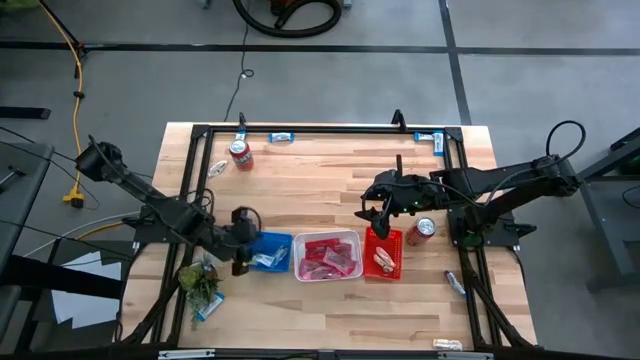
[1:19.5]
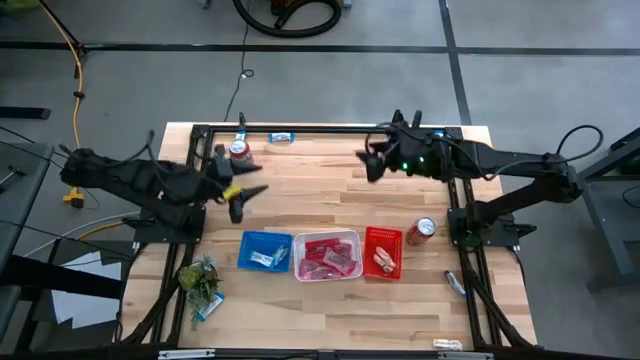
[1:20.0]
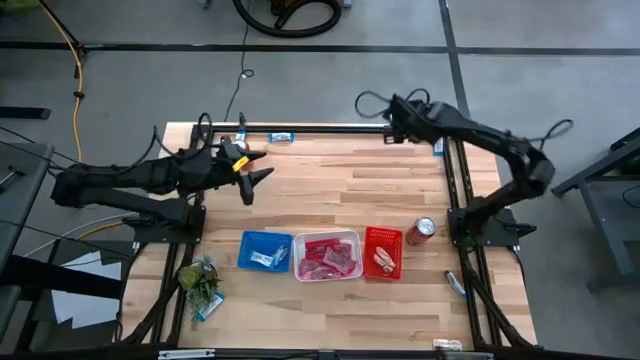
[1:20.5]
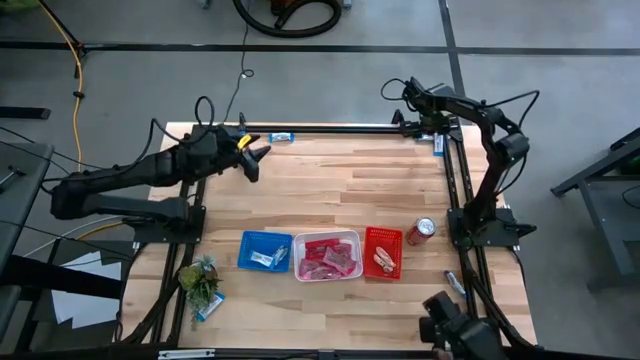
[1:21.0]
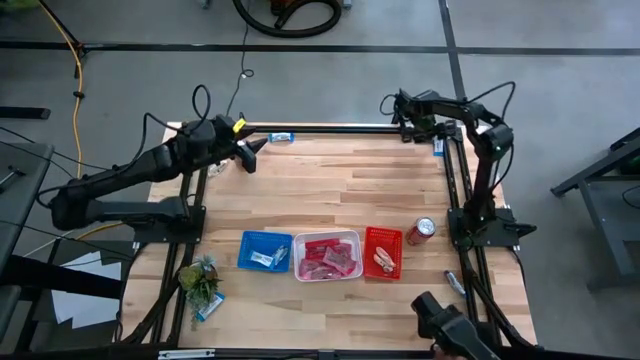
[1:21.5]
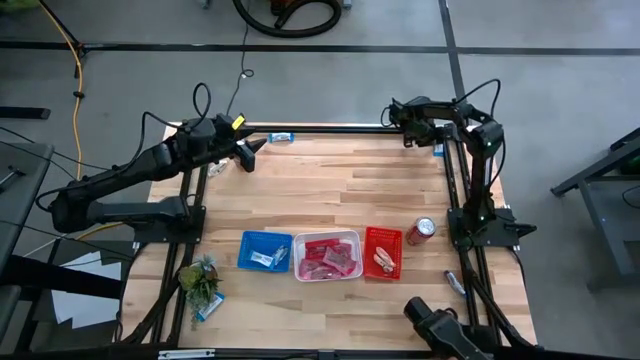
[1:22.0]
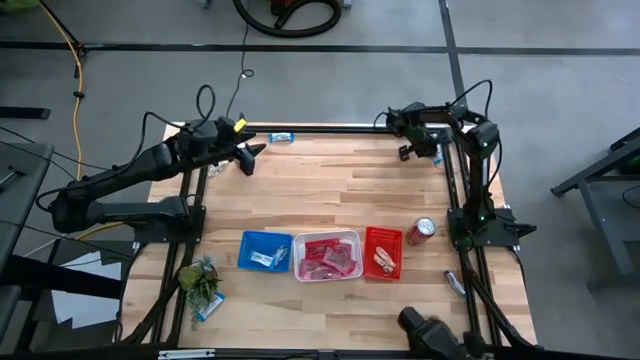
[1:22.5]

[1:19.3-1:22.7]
Task: Sort candy
Put the white chocolate into the blue bin

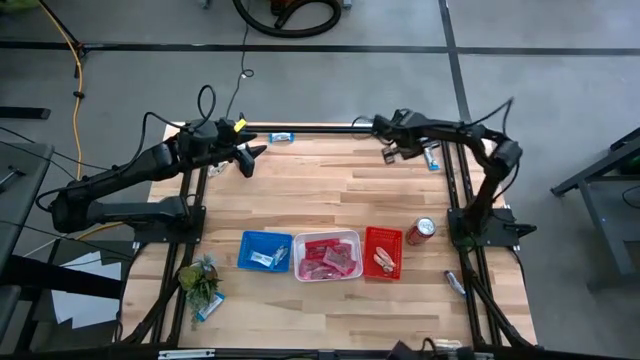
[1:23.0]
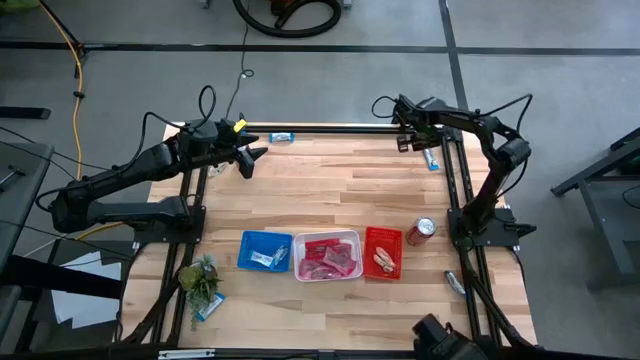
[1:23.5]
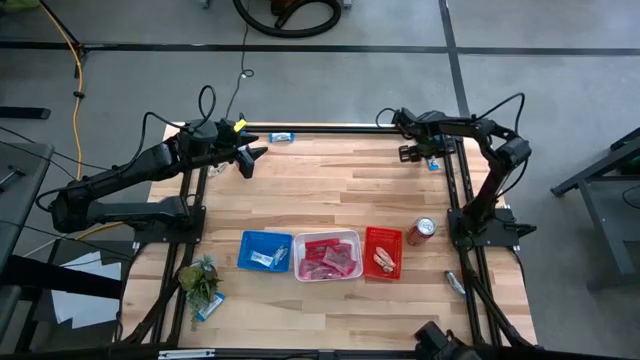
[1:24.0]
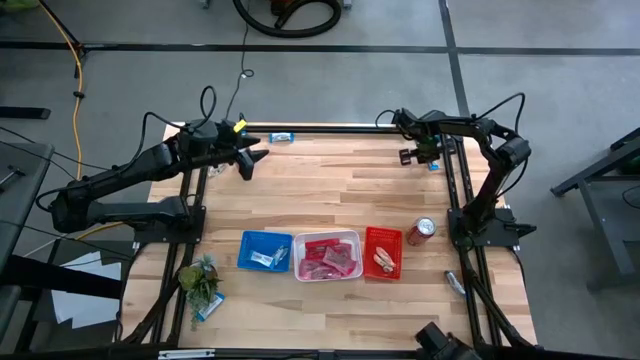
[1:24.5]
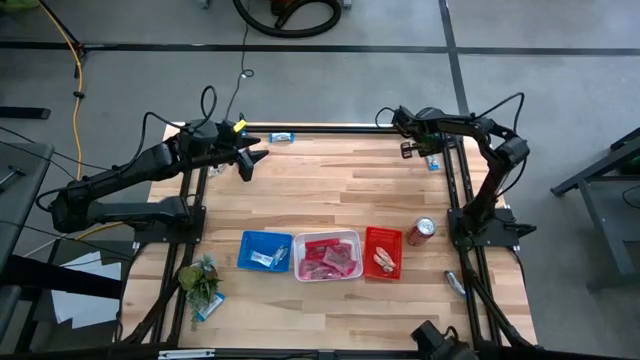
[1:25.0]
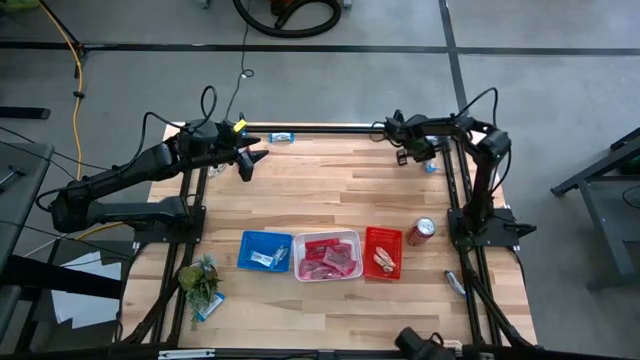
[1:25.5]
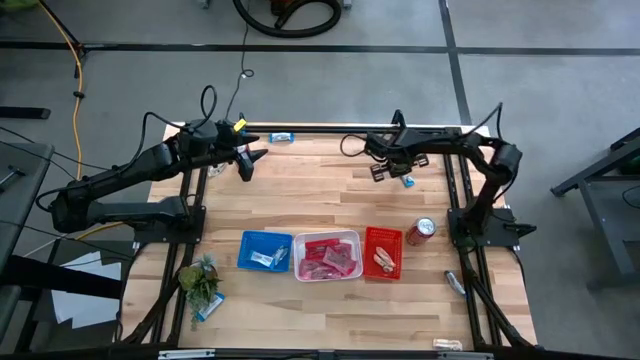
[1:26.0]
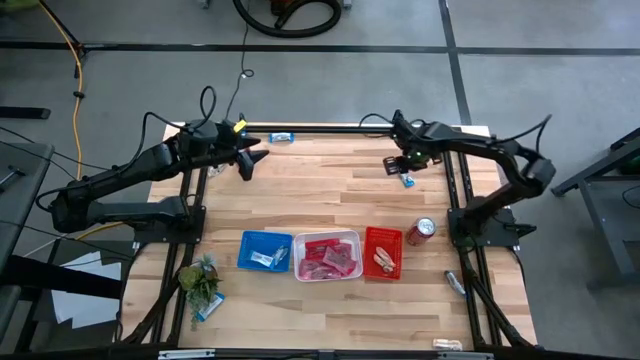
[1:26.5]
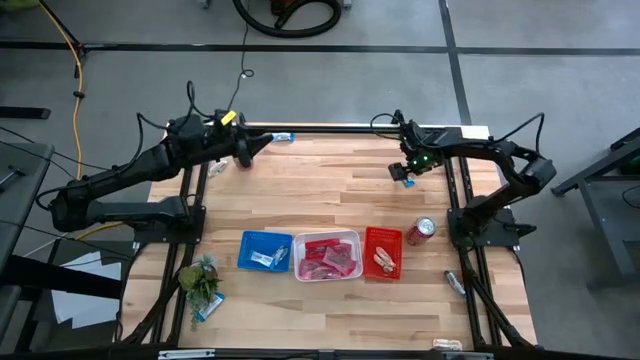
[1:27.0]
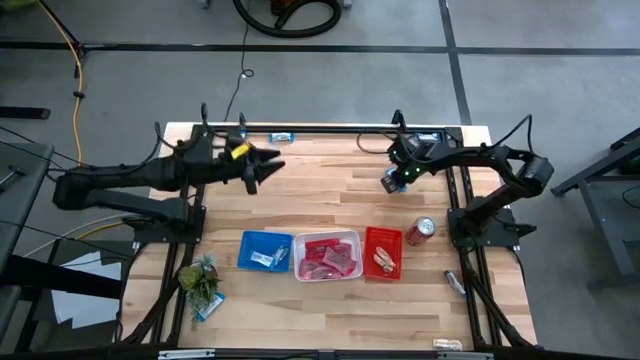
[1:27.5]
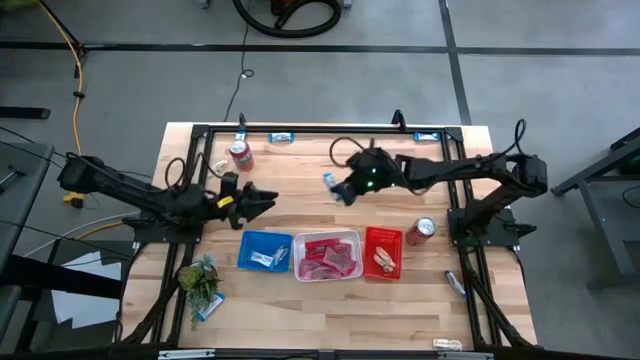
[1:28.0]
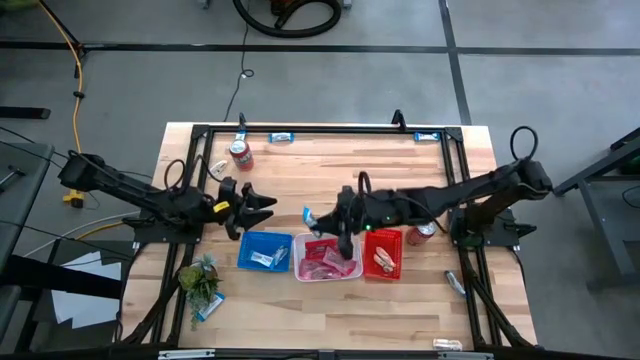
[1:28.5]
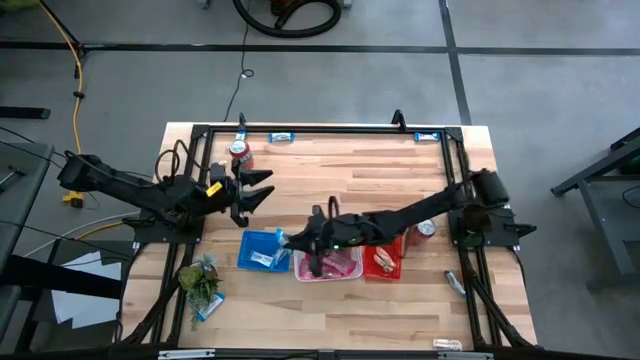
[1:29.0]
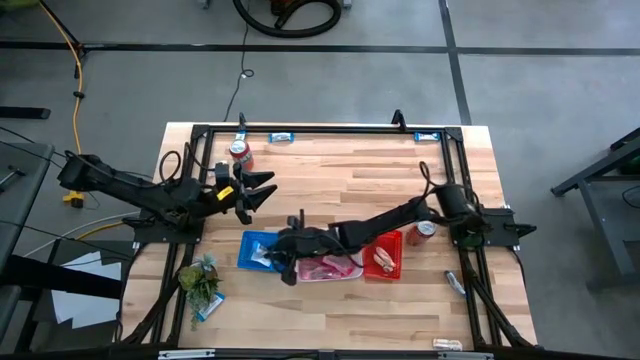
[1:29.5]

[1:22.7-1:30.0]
Put the white chocolate into the blue bin

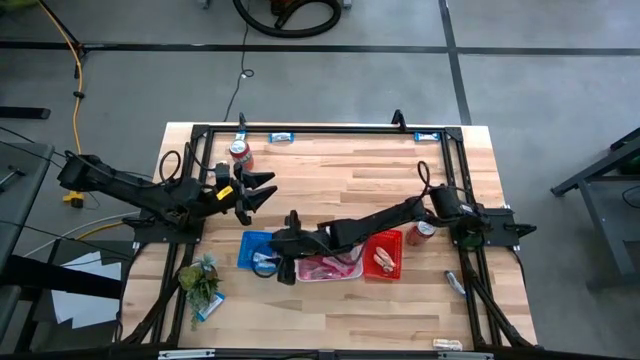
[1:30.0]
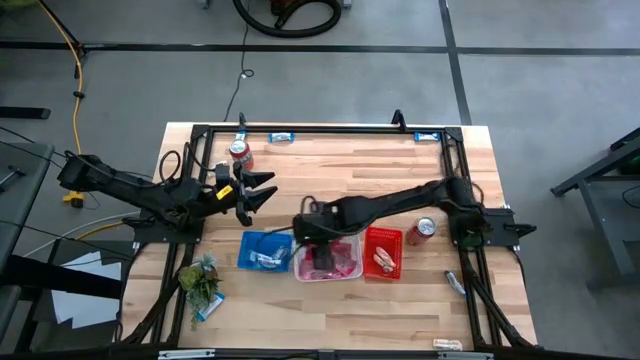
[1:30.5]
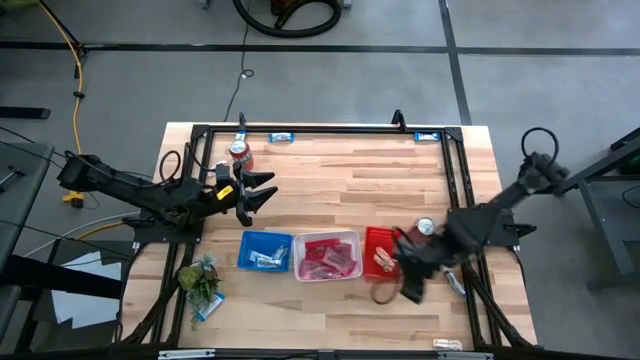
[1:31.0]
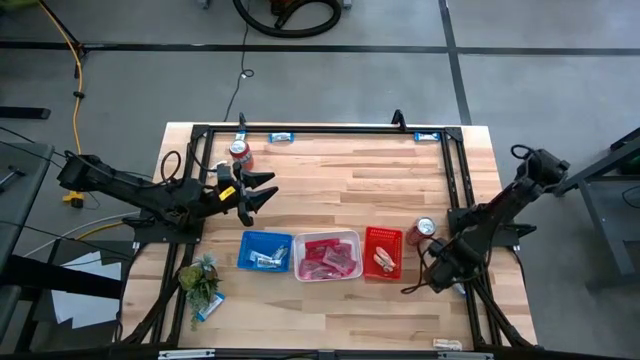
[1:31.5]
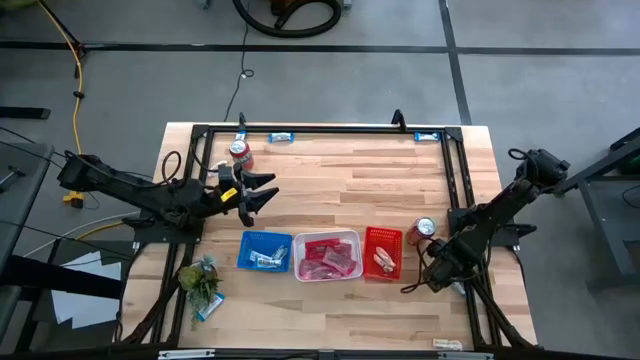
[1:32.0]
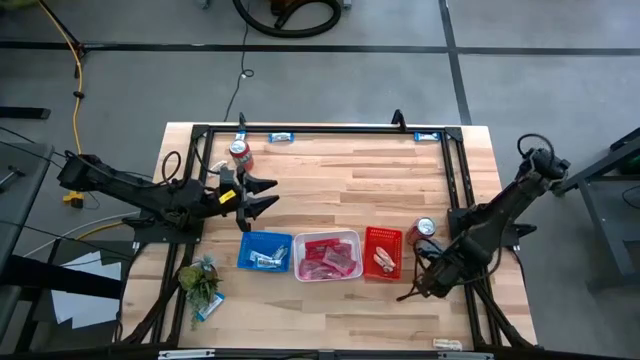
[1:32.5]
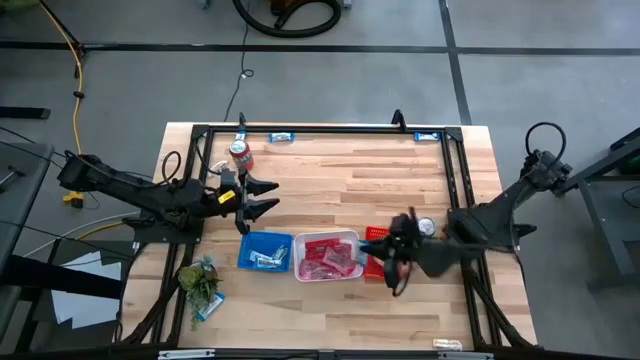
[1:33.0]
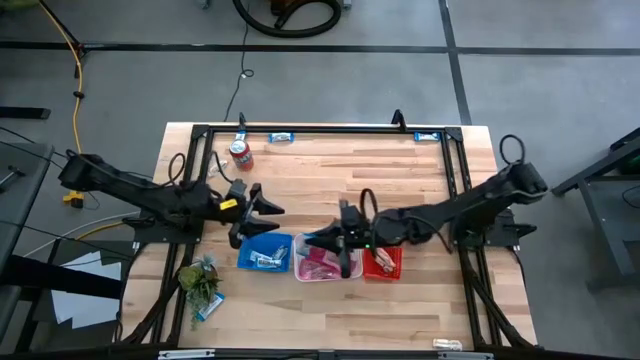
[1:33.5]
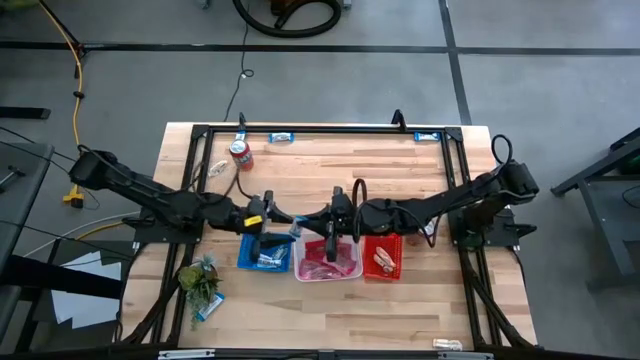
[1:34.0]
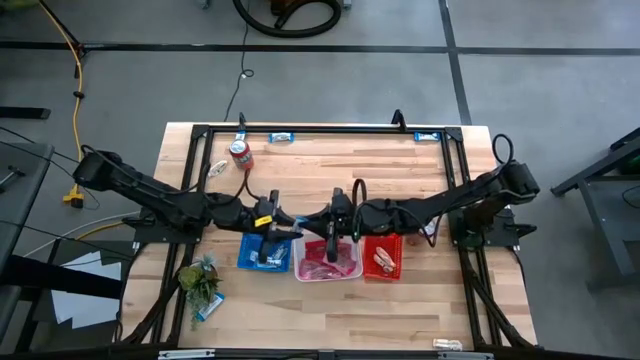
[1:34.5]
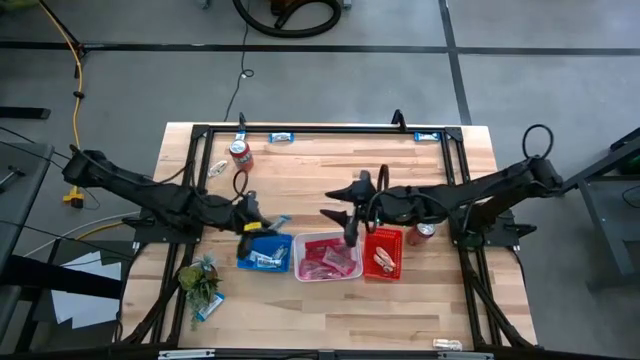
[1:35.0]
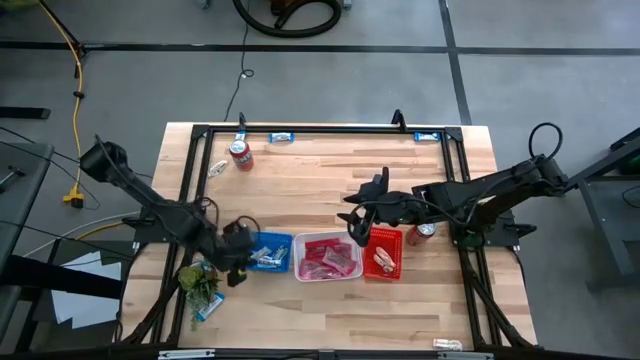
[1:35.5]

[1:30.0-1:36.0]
Put the white chocolate into the blue bin

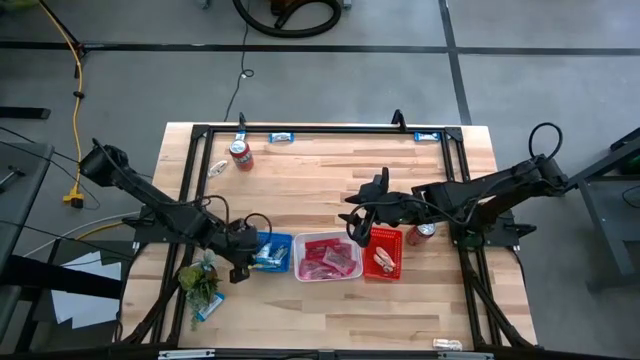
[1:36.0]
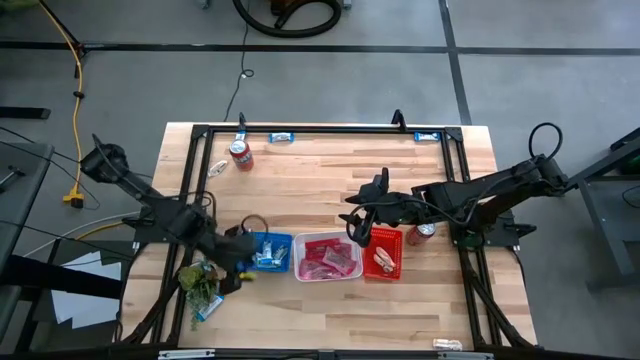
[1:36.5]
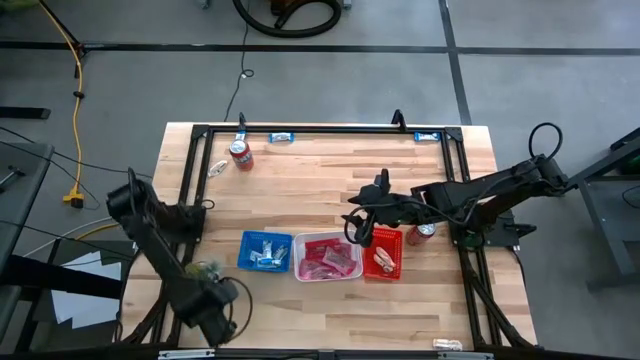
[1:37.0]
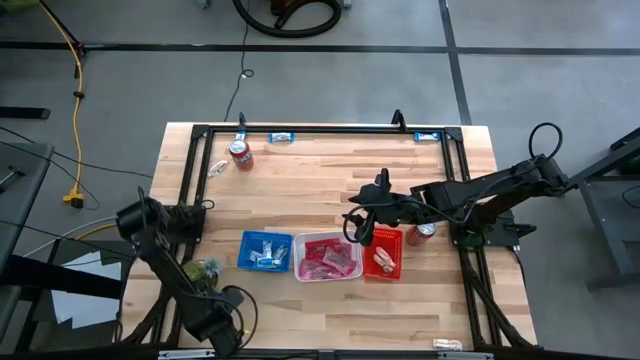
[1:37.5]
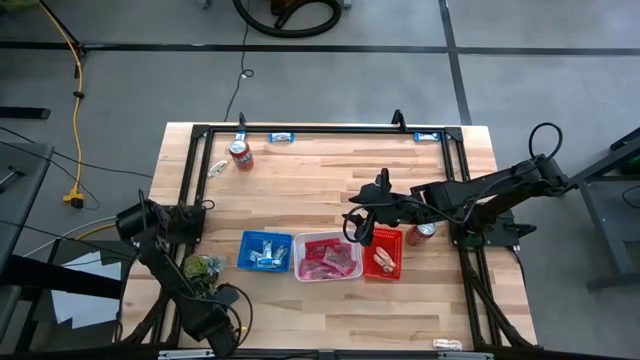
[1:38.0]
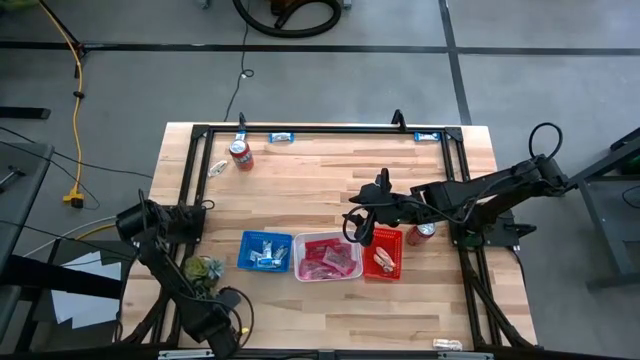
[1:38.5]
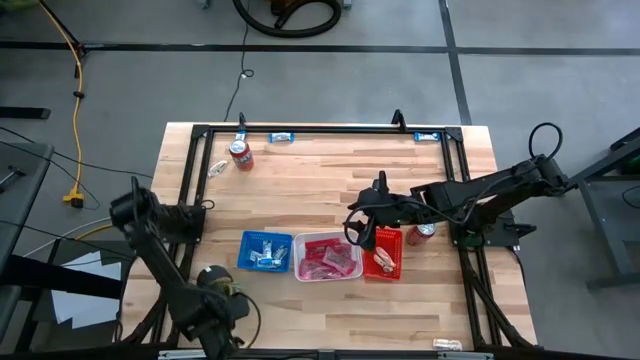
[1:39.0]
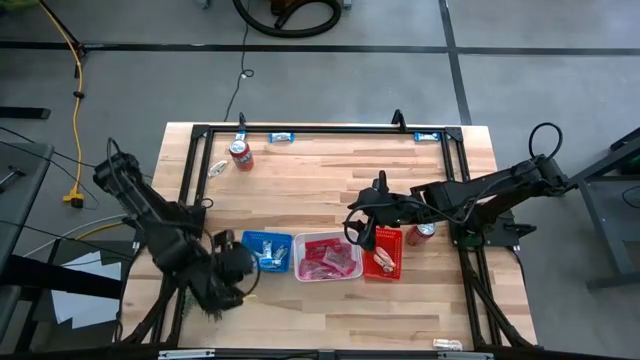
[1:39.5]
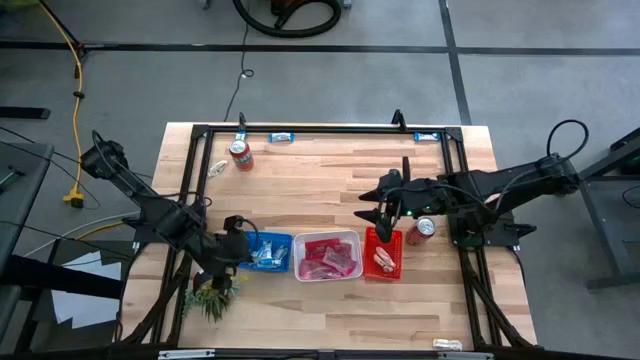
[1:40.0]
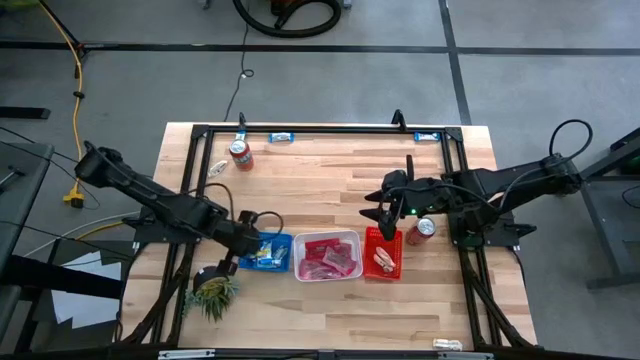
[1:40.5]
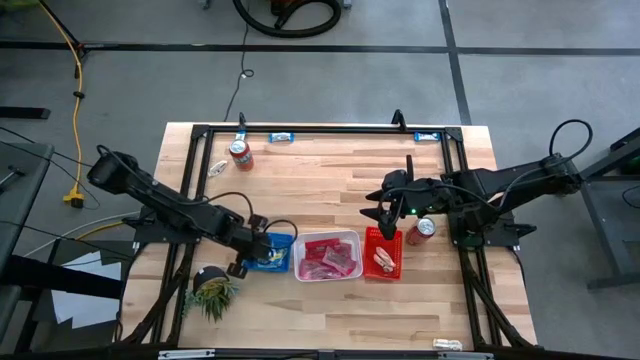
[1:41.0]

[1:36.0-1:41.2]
Put the white chocolate into the blue bin
